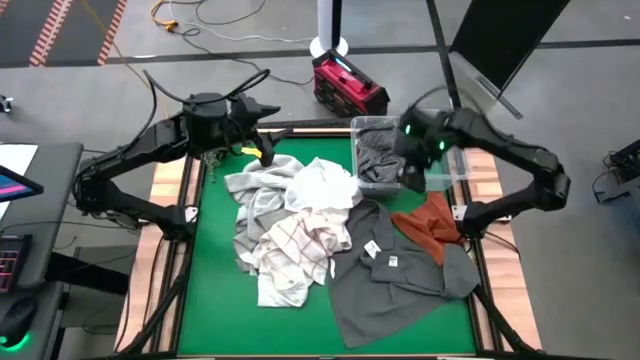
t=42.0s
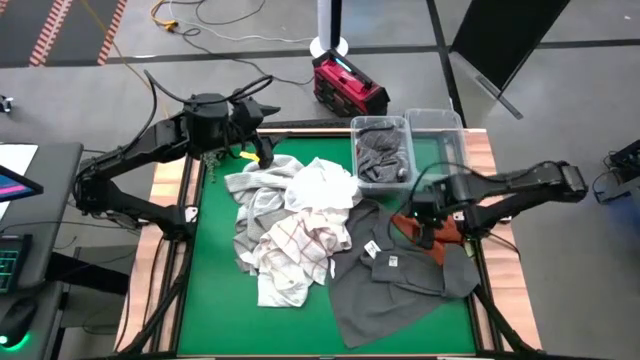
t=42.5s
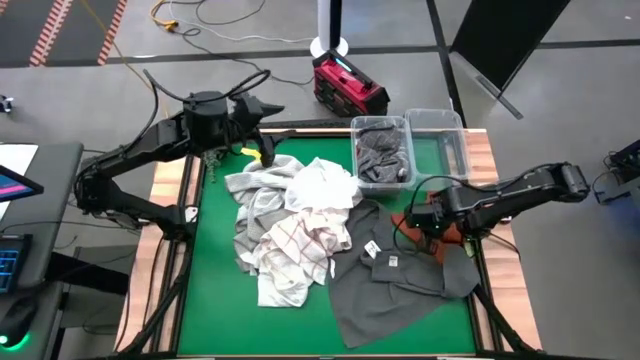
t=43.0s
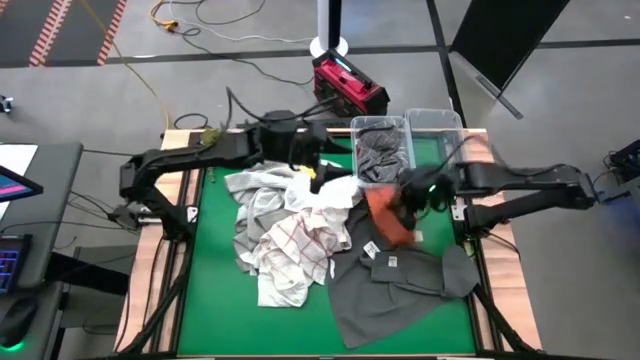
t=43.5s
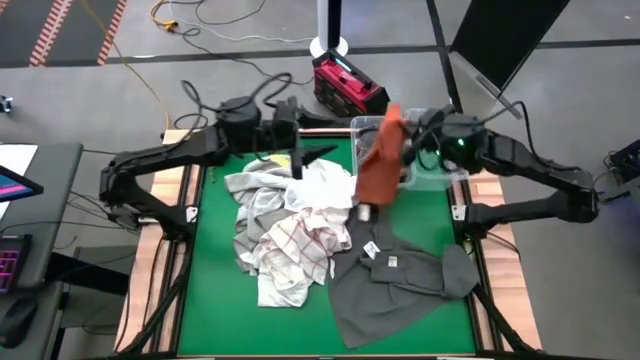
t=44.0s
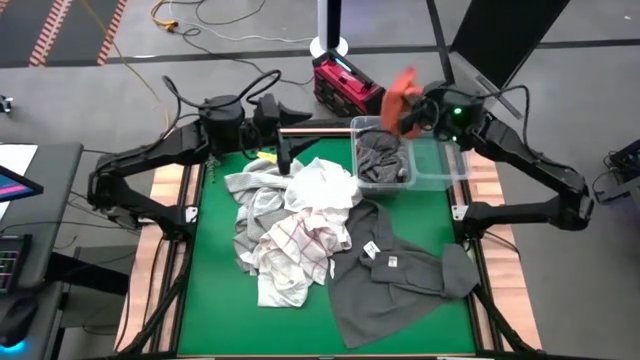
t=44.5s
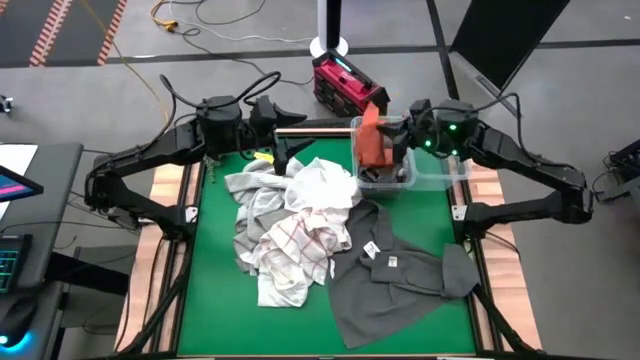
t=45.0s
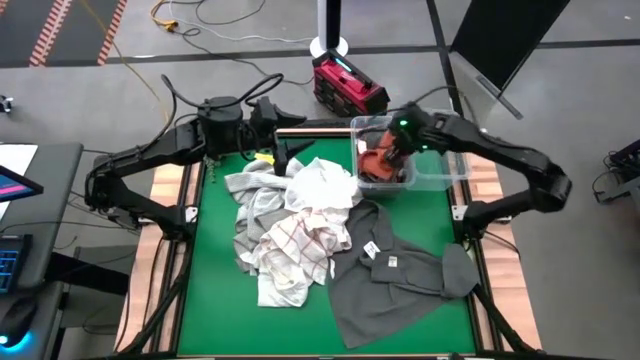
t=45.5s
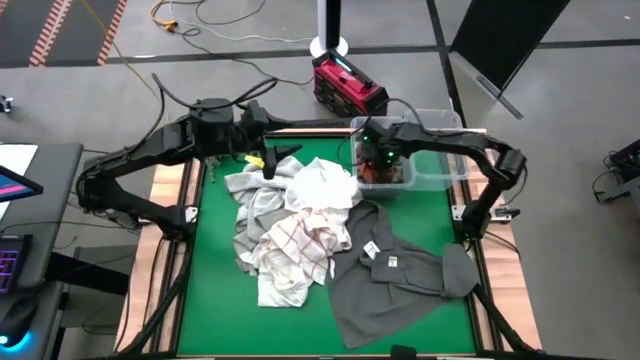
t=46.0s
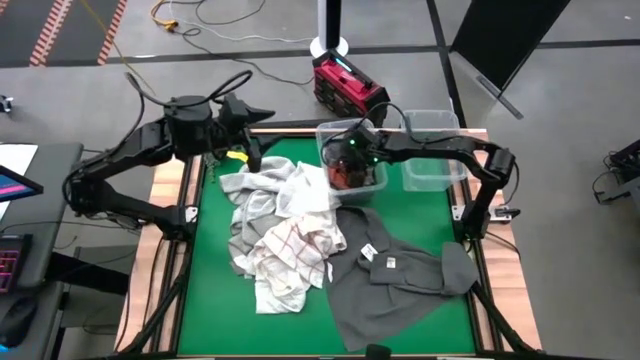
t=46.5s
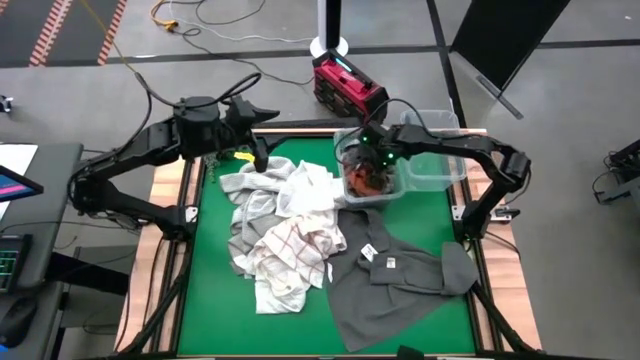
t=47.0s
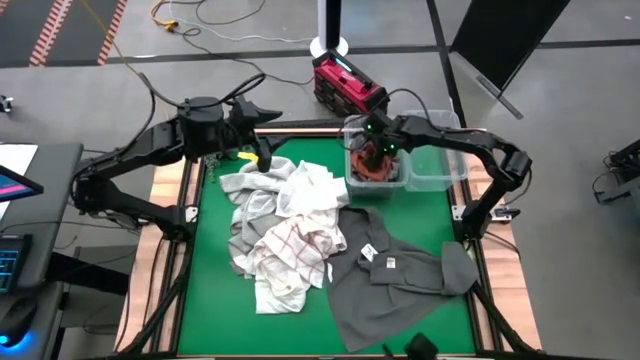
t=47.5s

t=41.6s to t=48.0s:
Task: Sort towels by color in basket
Put the orange towel into the left transparent bin

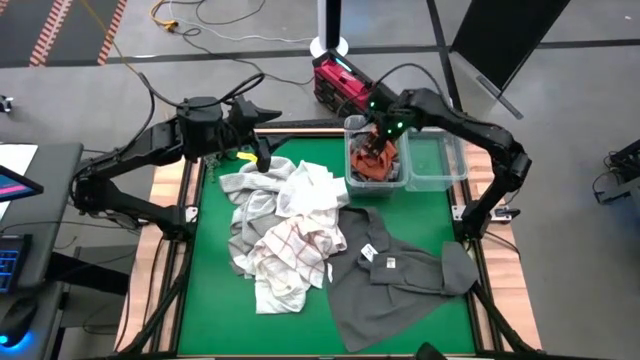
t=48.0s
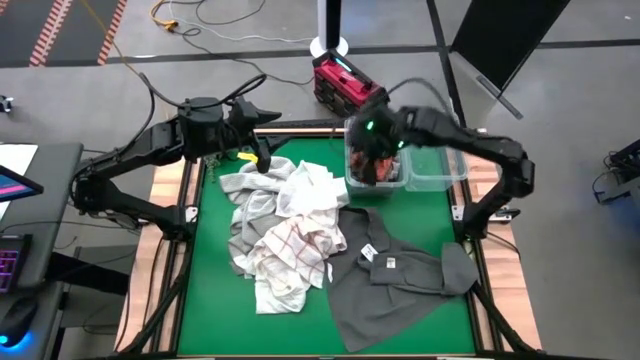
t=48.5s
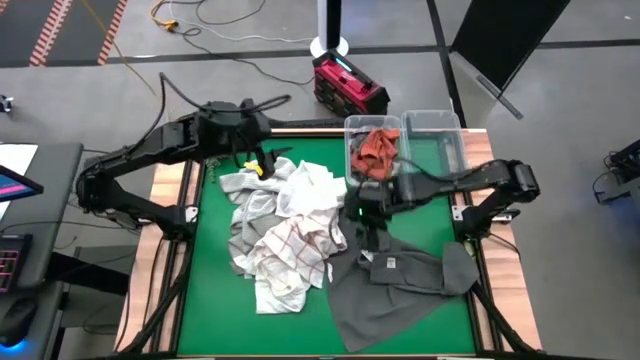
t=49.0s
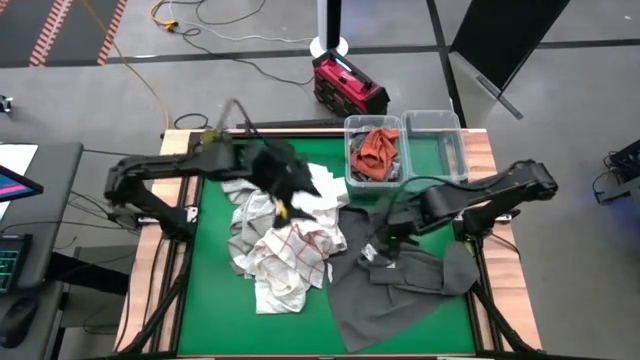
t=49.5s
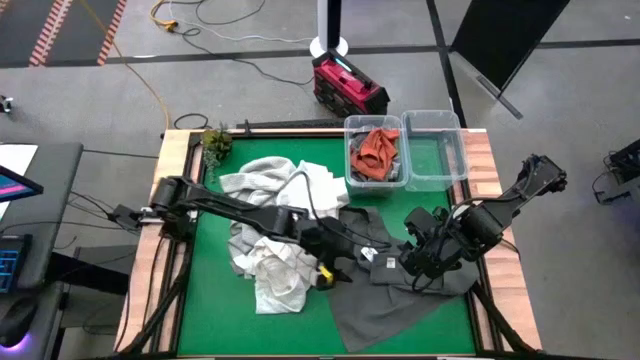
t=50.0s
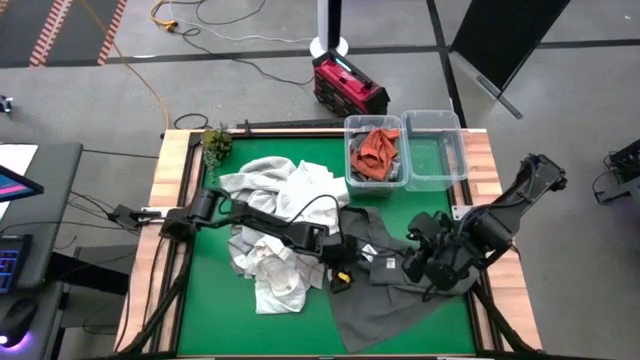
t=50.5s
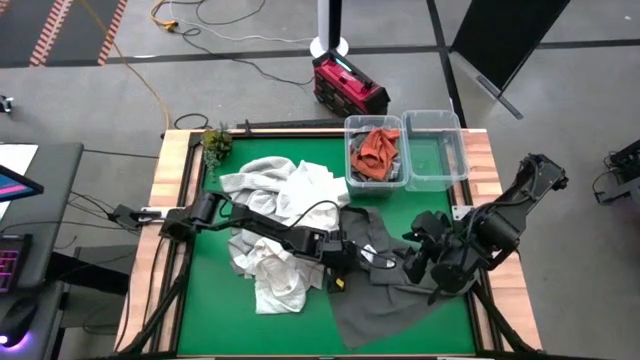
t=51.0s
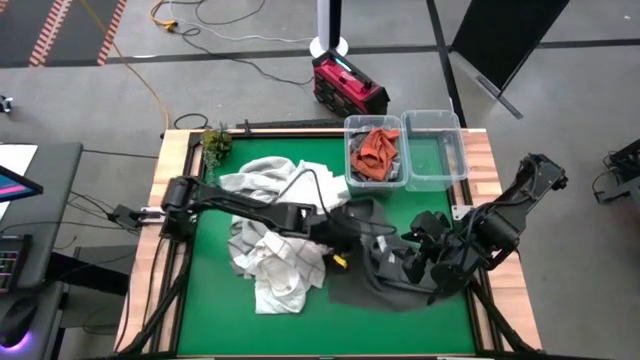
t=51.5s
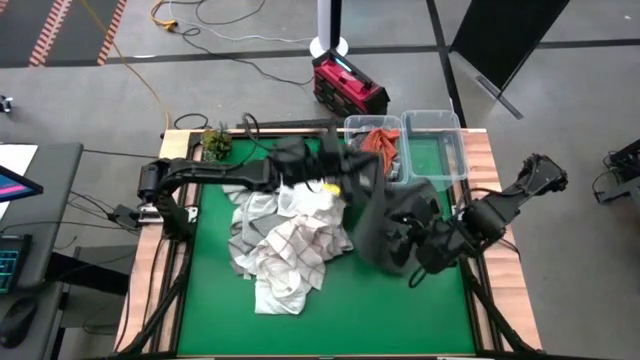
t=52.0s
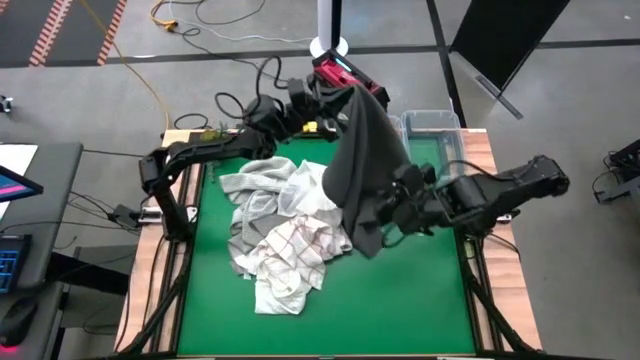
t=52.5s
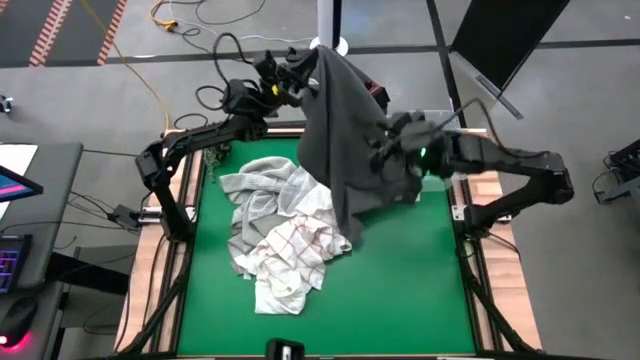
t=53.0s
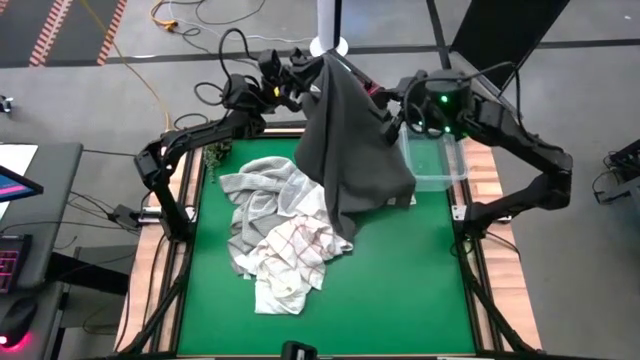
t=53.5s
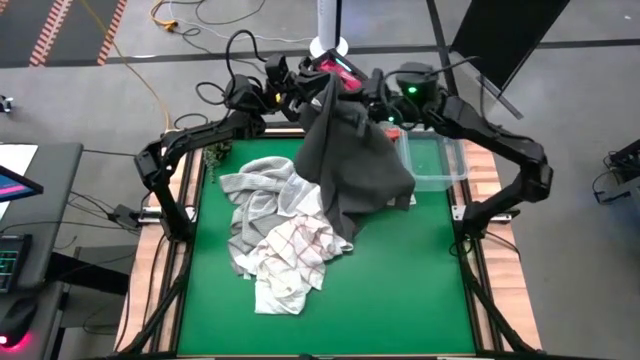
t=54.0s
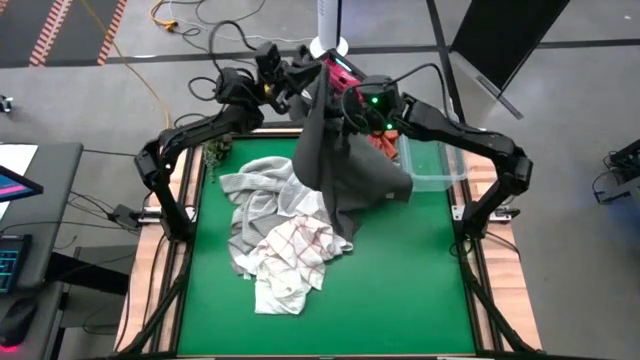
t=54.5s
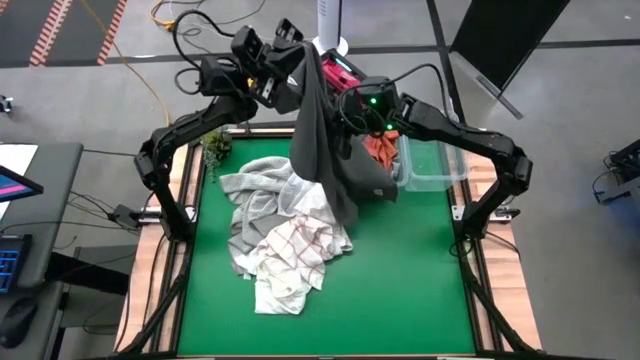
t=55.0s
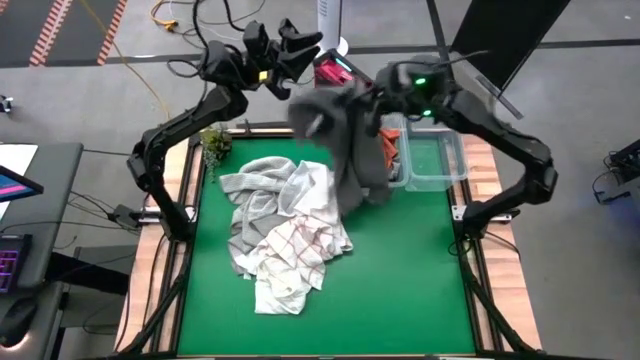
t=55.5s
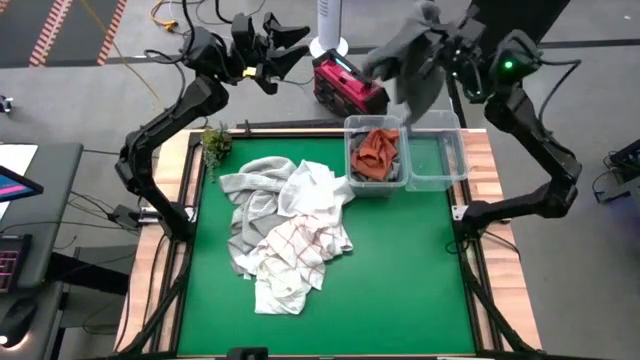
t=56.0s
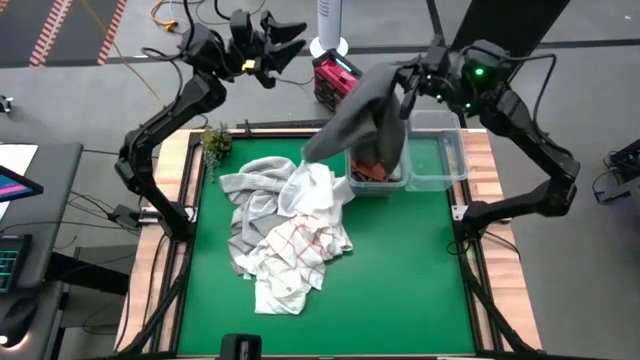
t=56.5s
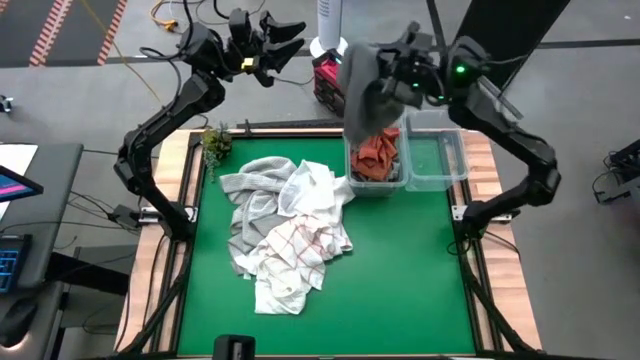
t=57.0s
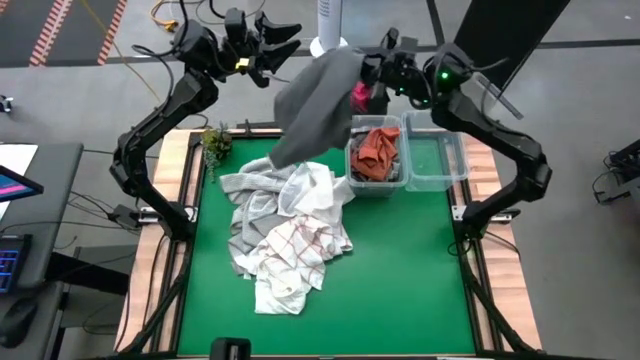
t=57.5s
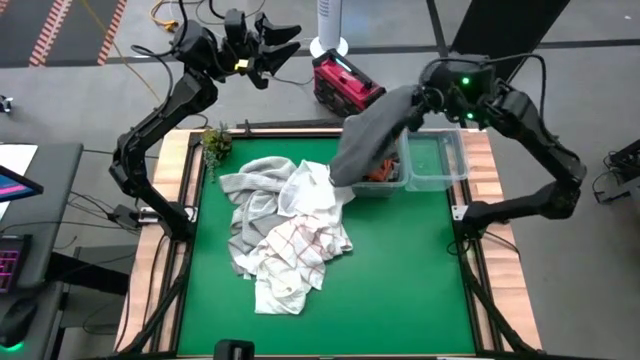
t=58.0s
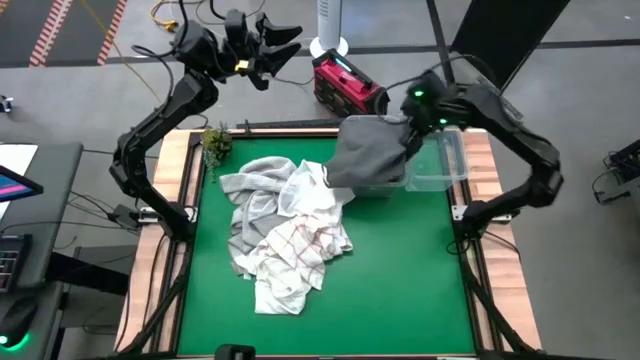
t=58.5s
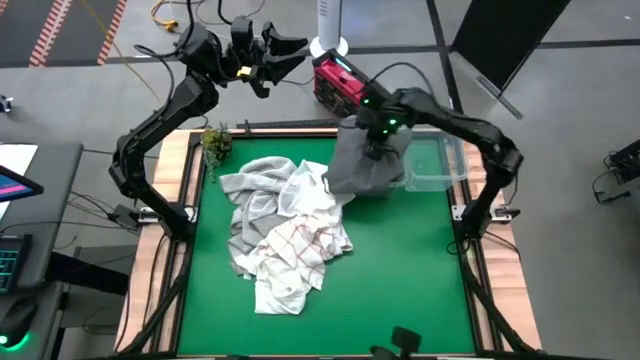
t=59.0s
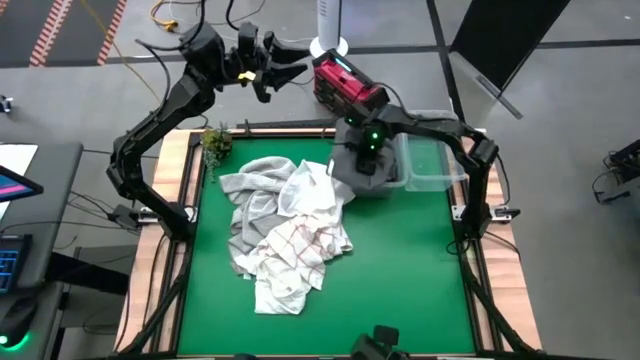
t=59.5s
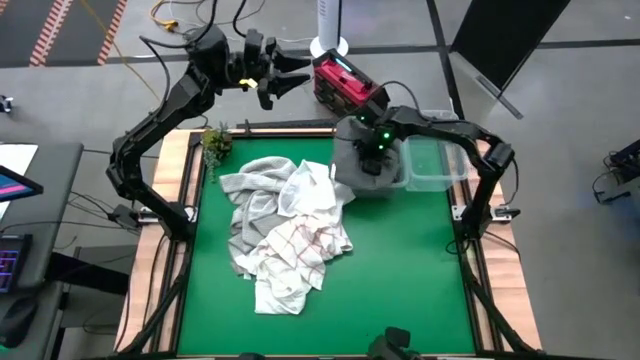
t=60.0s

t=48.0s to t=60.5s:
Put the dark gray towel into the left transparent bin

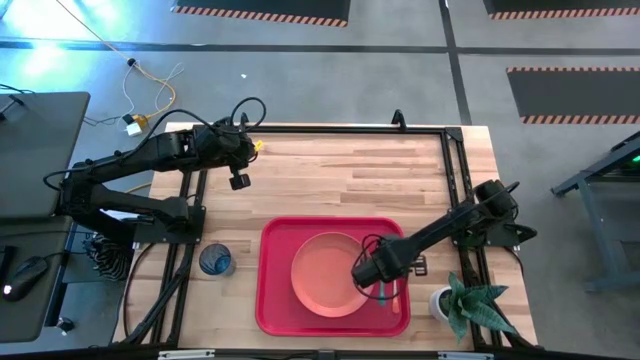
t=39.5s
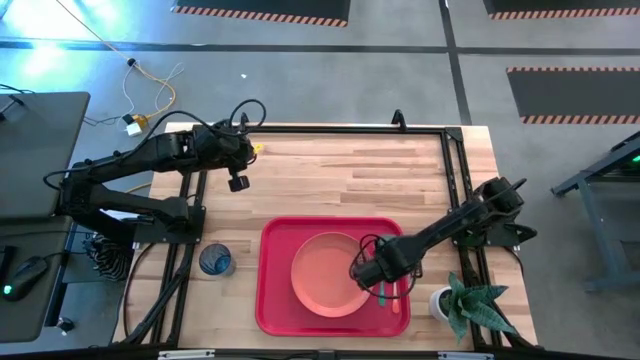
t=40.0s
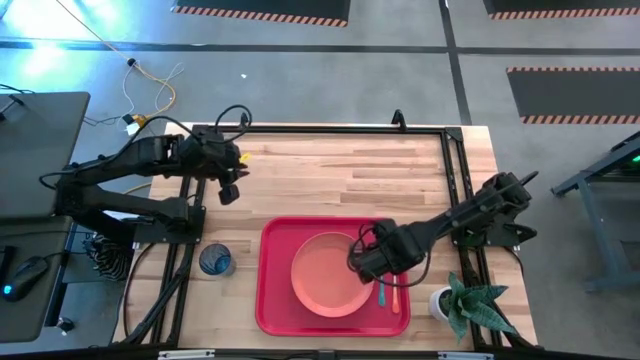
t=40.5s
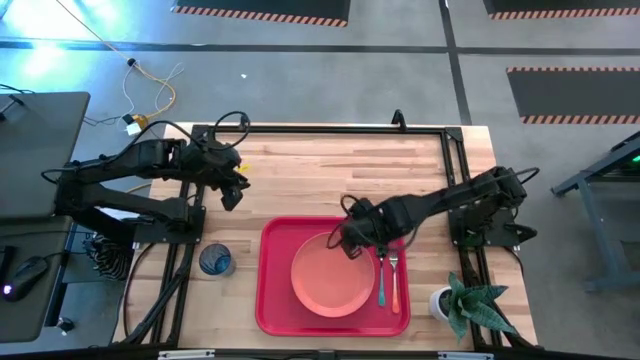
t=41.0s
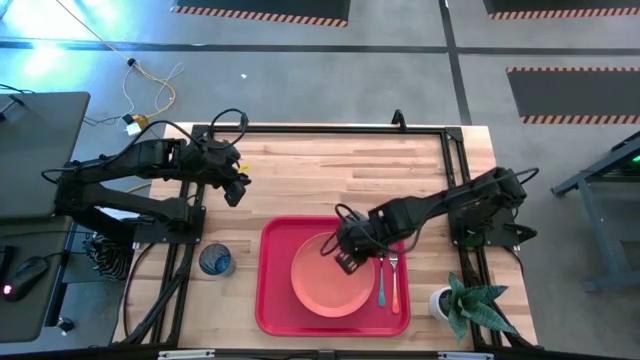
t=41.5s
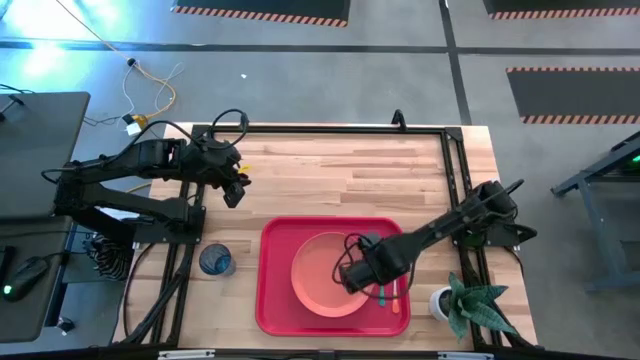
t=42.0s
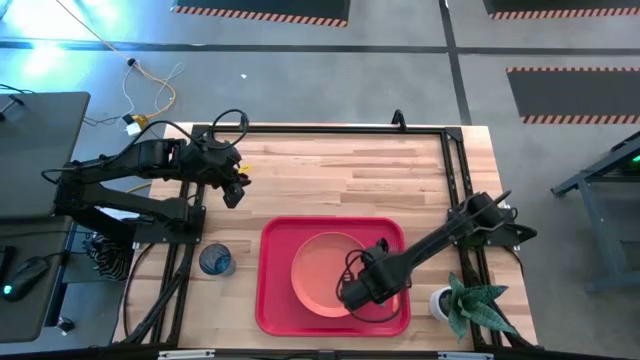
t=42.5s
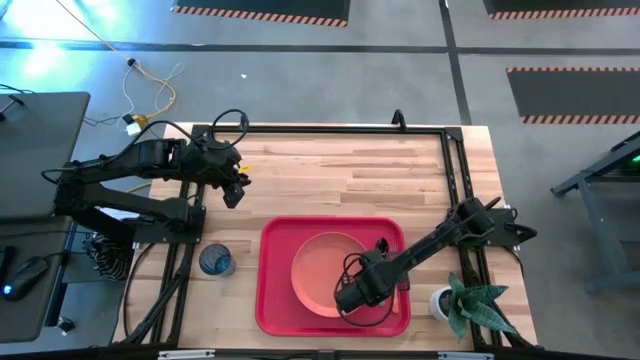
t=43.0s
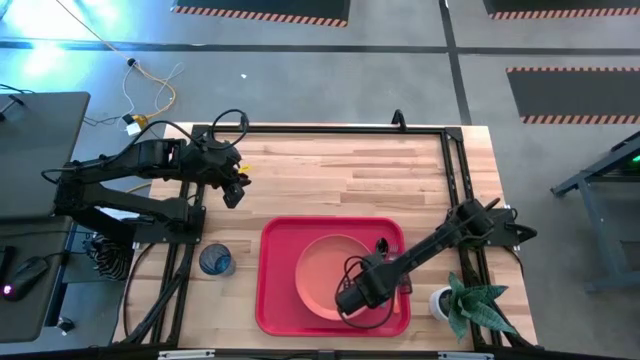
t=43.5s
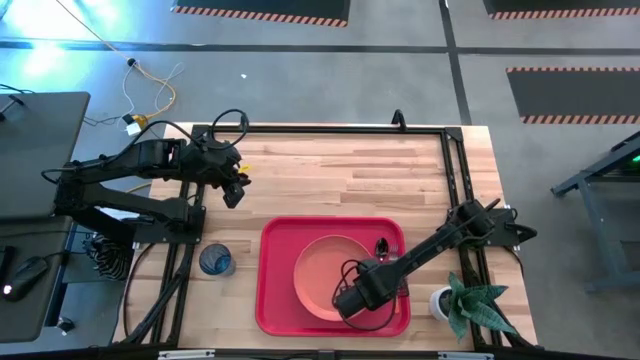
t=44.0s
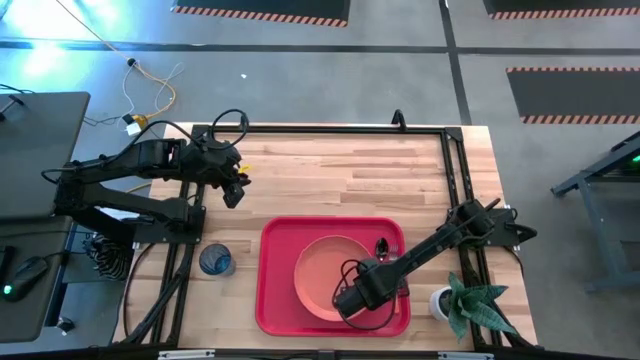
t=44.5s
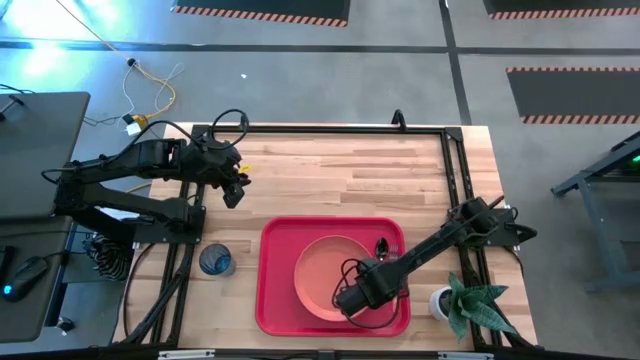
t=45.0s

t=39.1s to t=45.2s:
Task: Pick and place plate/cup/fork/spoon on tray
Adjust the orange plate
